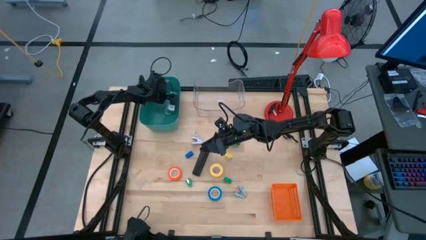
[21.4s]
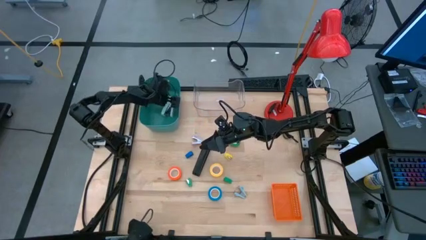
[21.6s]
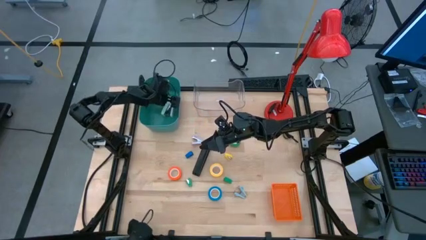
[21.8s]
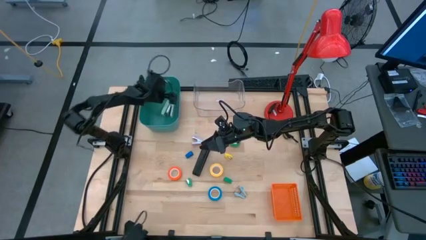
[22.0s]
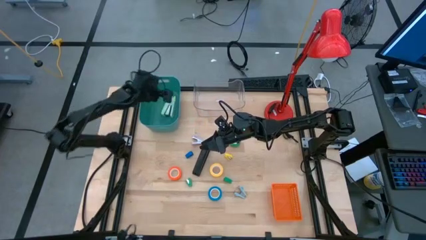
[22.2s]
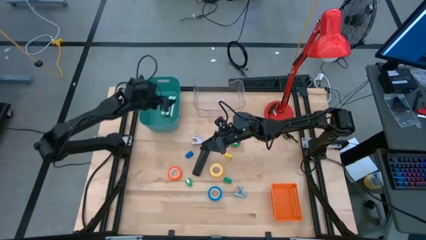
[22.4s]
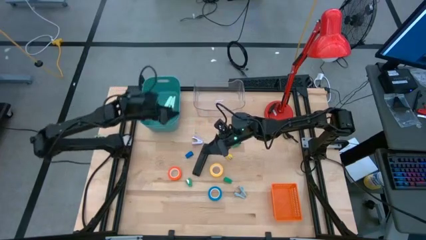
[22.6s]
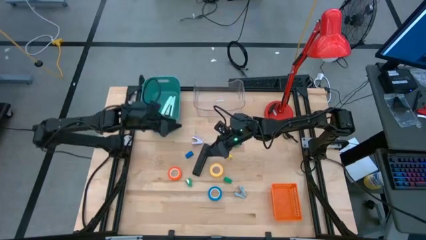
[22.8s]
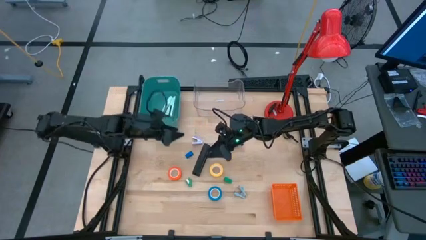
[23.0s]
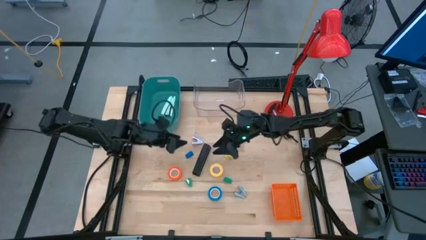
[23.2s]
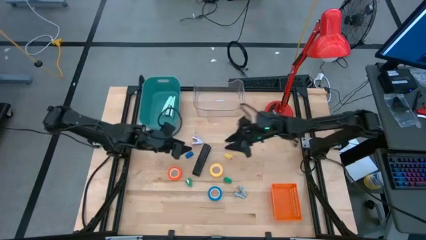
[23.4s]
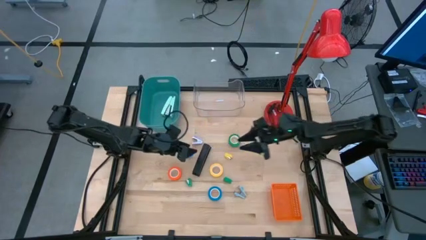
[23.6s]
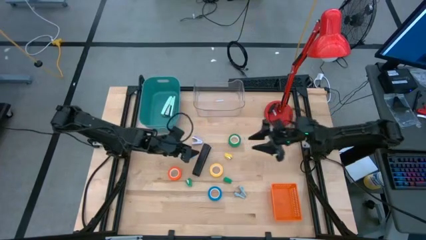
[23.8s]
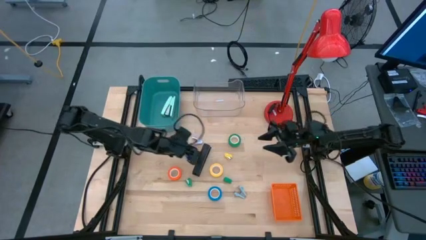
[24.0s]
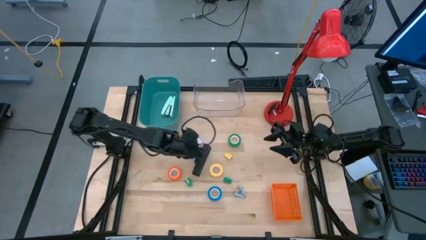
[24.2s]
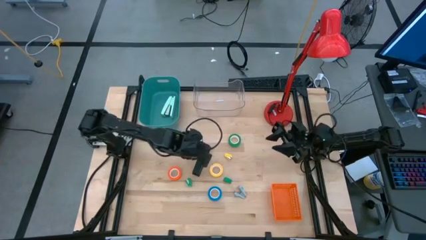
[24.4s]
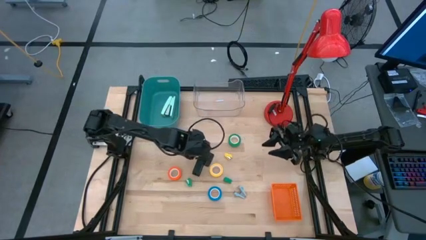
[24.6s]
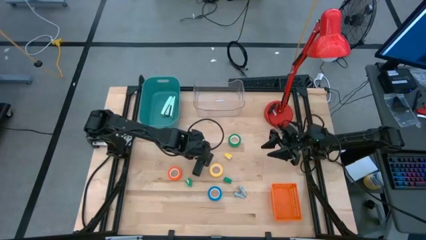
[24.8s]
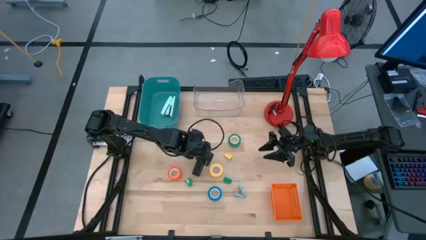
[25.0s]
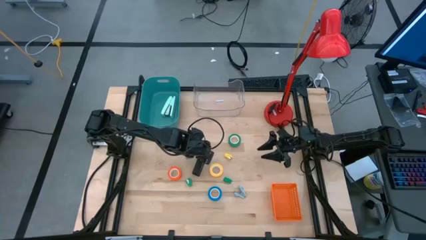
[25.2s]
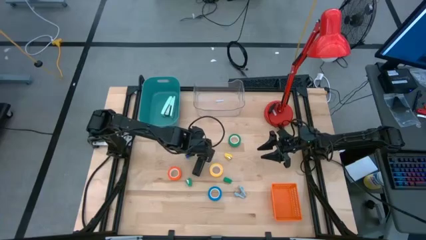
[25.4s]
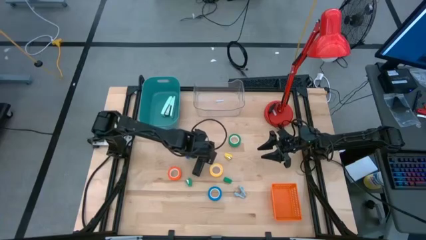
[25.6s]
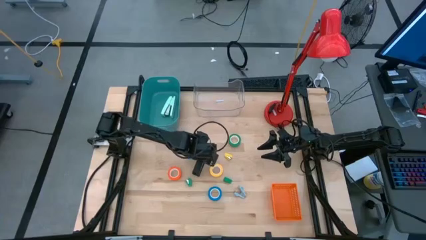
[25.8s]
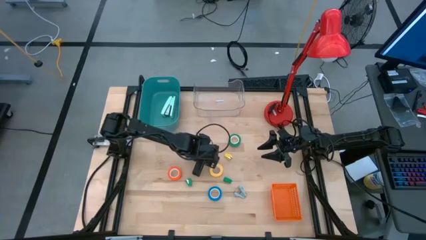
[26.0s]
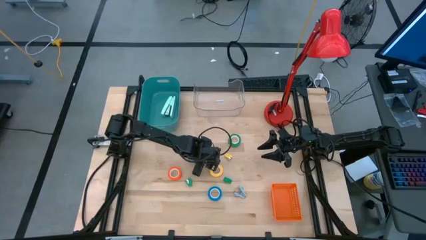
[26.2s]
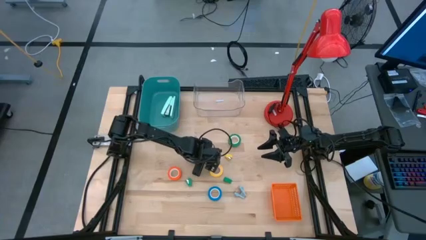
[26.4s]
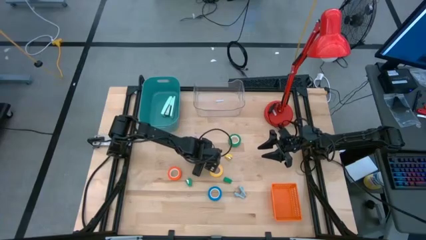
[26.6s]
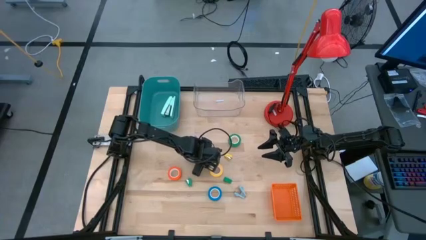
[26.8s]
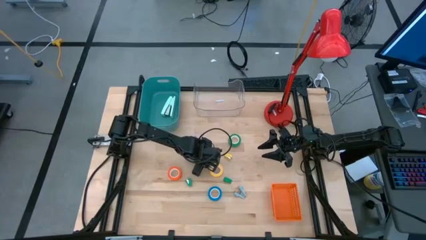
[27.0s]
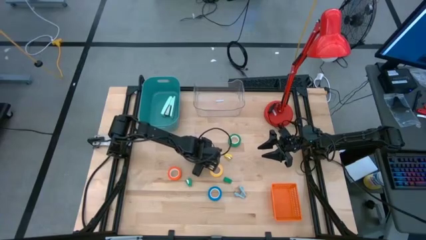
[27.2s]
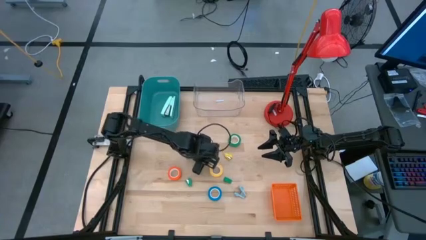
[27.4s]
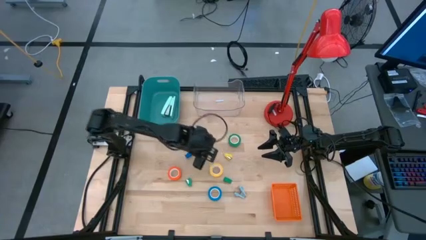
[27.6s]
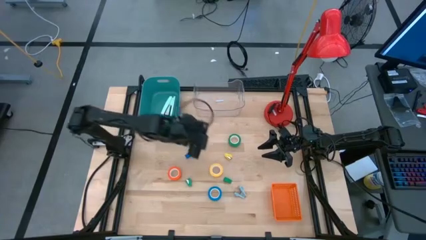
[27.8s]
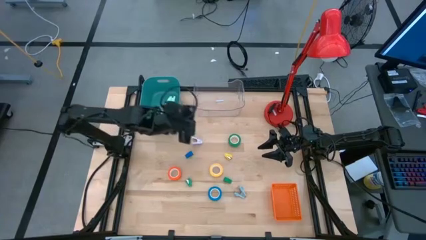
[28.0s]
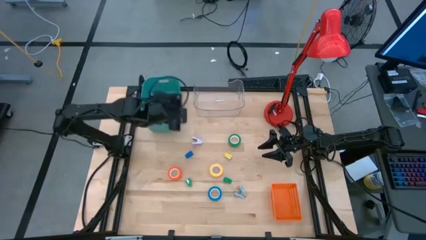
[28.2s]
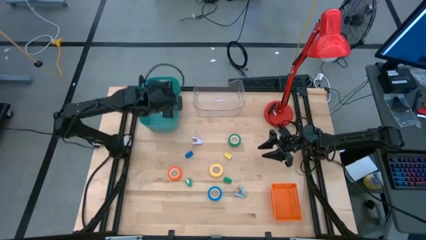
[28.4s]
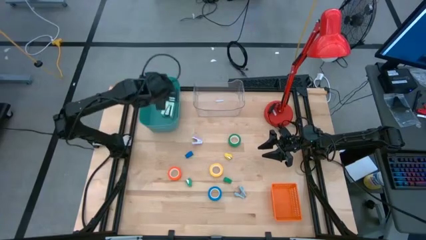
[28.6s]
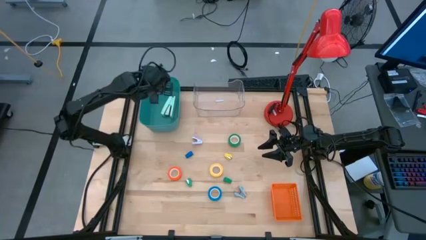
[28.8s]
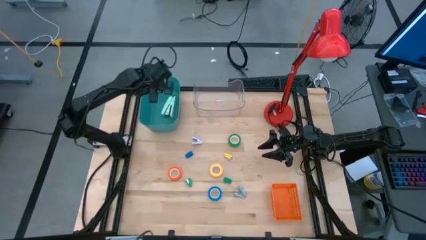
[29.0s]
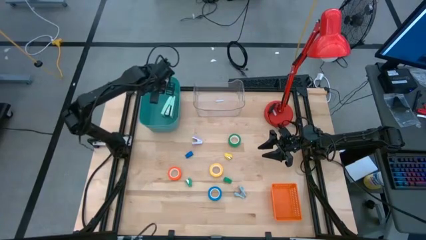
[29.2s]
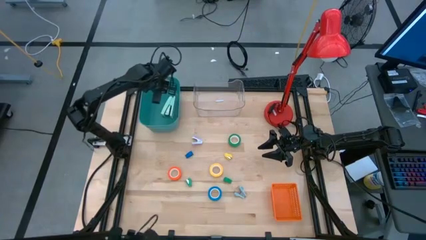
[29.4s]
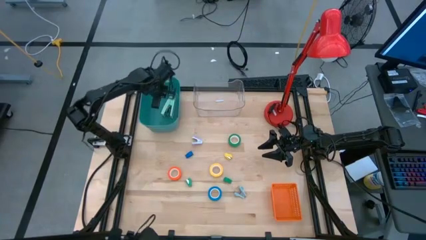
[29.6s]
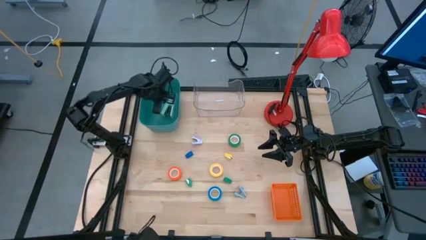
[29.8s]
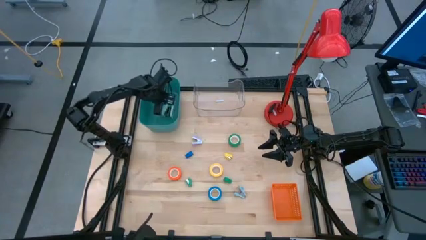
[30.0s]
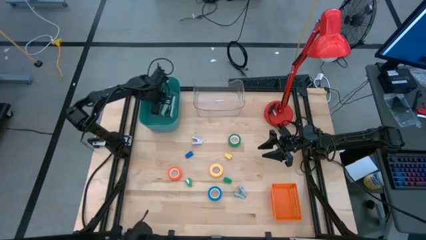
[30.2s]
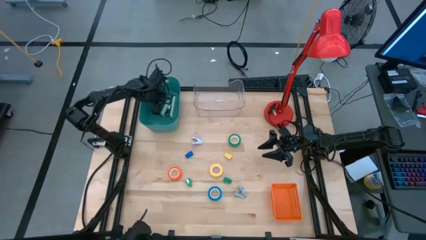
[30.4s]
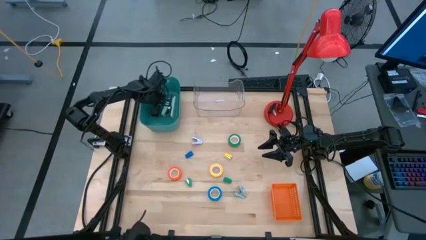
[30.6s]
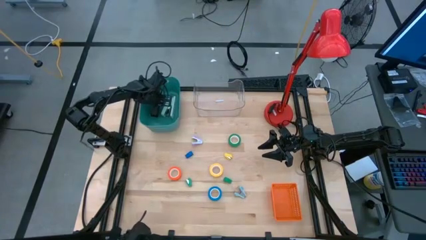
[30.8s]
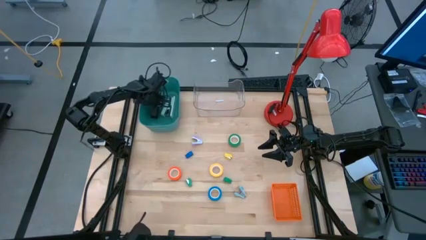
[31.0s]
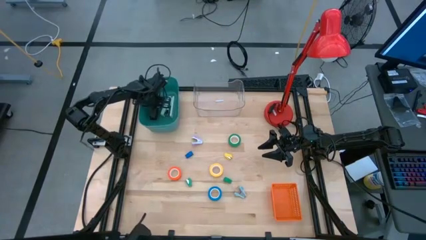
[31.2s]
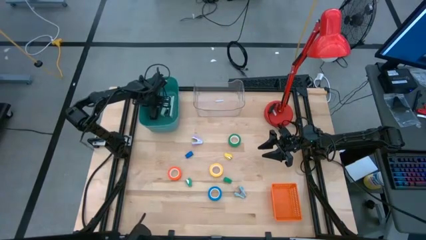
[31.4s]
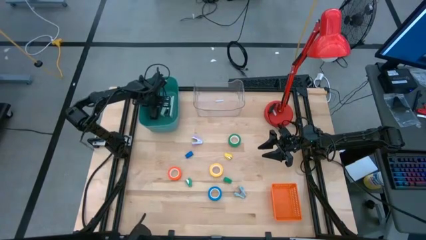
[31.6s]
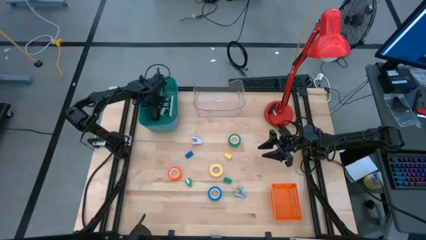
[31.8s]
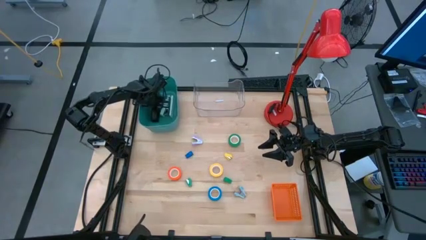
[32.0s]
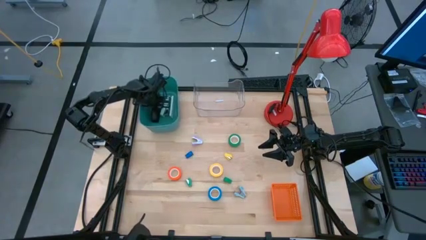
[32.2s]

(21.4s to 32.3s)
Task: Pick and place Stapler, Stapler remover, tape
Put the large black stapler into the green bin

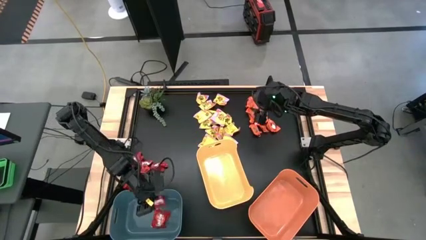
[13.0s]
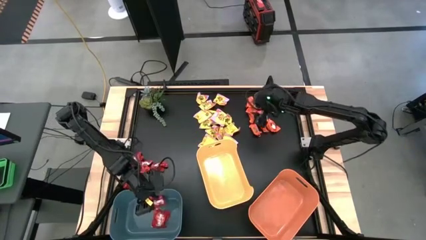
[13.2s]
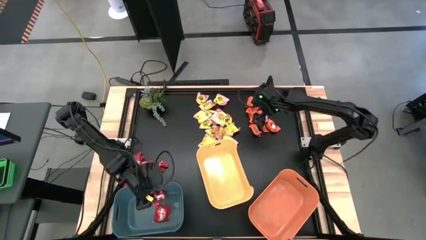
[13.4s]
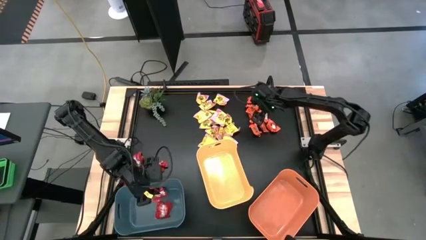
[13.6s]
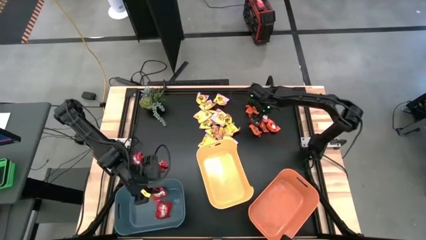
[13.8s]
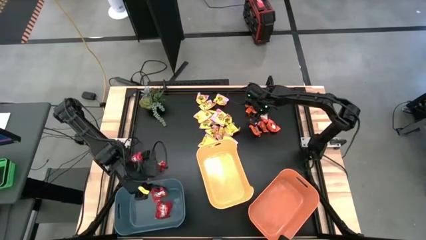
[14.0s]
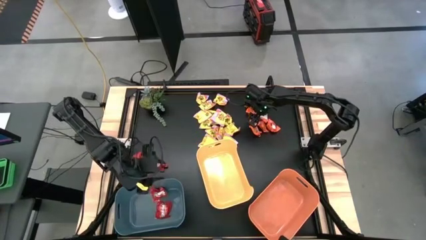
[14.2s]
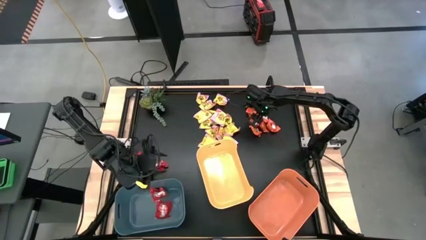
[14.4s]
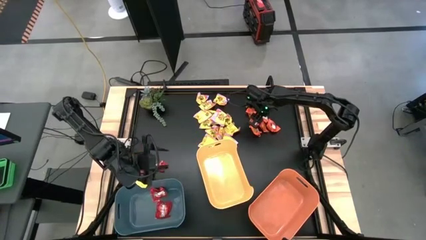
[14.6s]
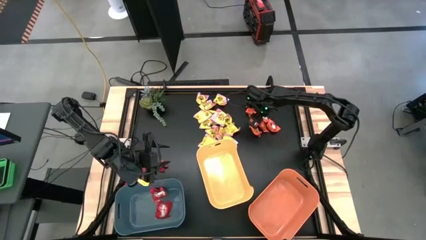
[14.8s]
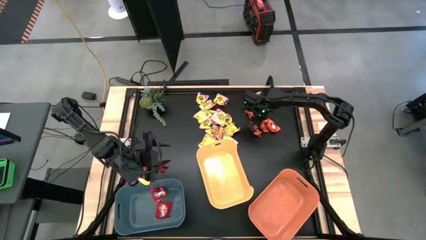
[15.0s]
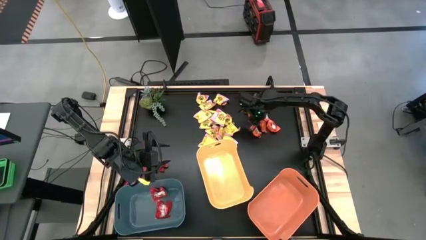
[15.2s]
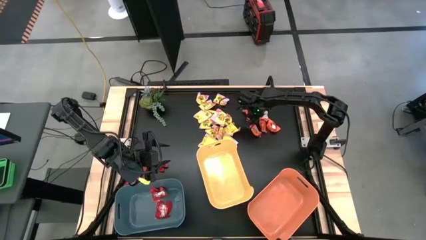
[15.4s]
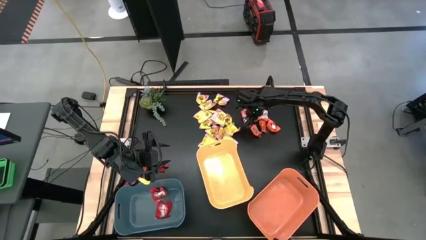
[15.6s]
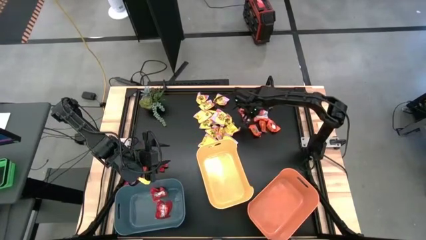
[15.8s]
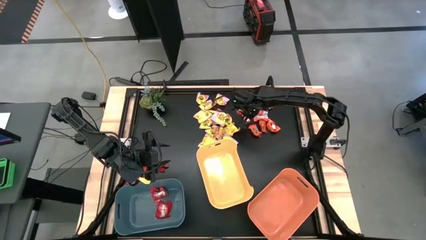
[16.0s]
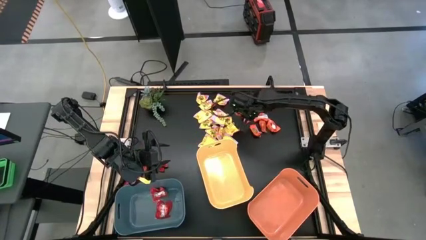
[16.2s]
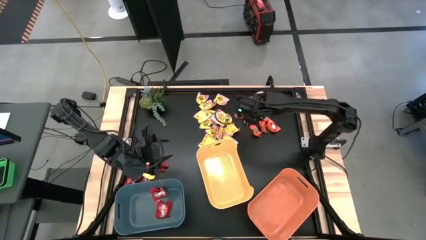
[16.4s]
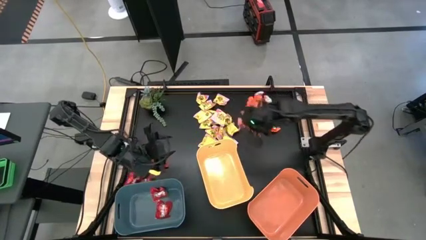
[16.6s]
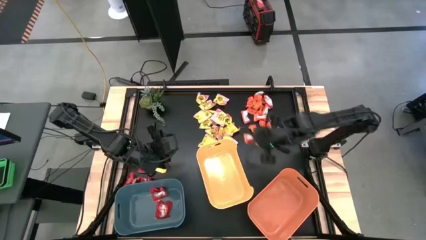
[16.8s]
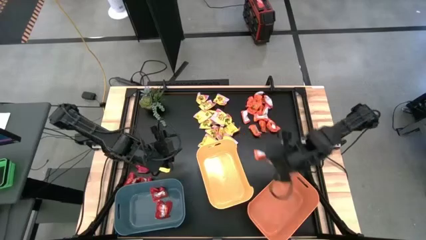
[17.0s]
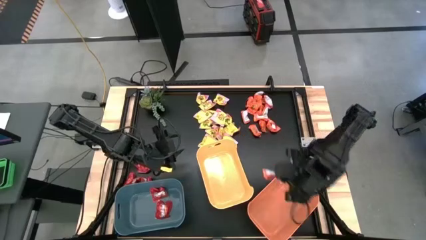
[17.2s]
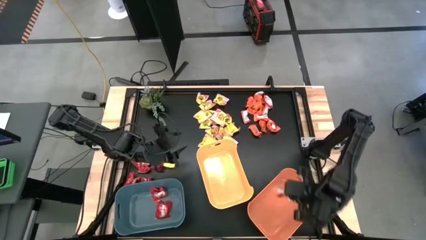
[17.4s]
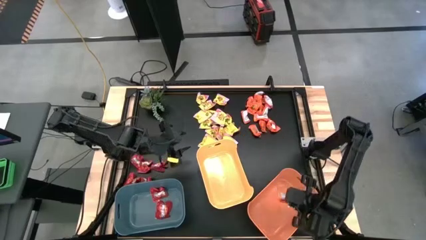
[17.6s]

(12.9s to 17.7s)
Task: Sort candy
Put the orange chocolate into the orange bin
